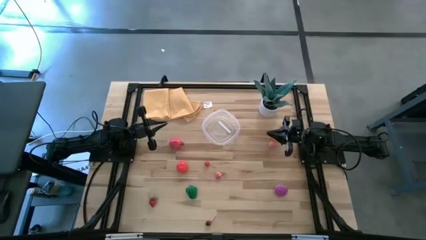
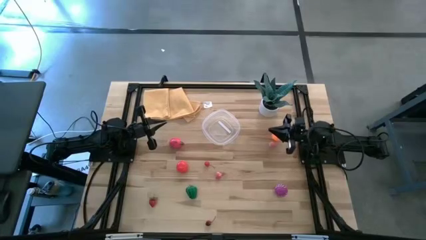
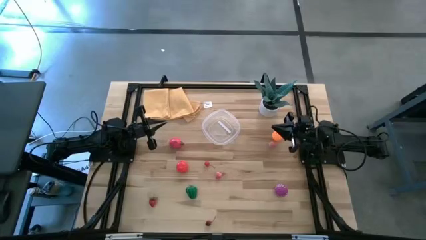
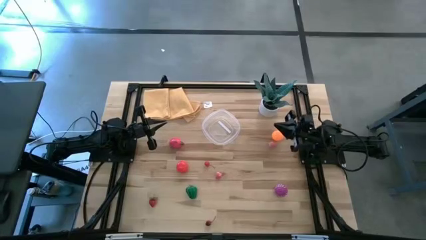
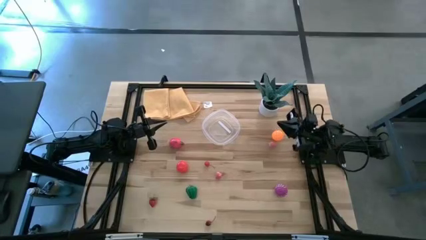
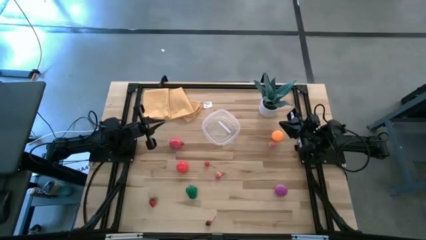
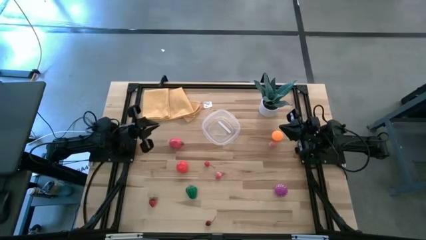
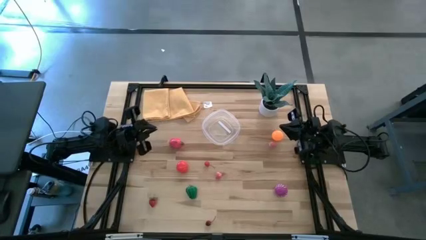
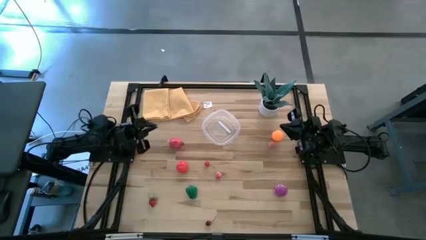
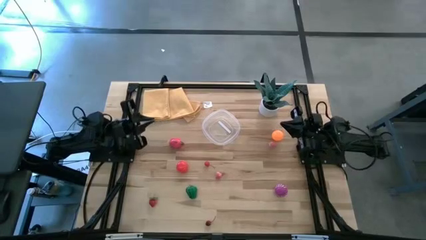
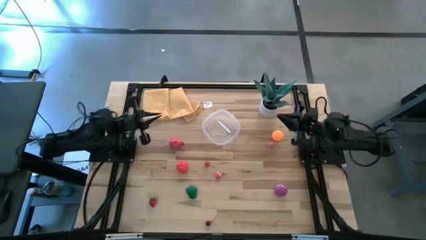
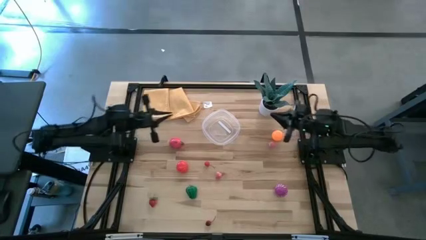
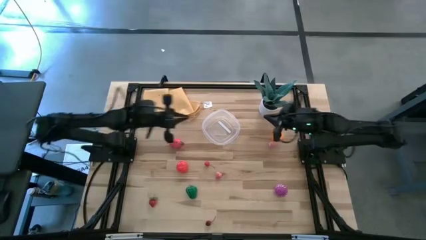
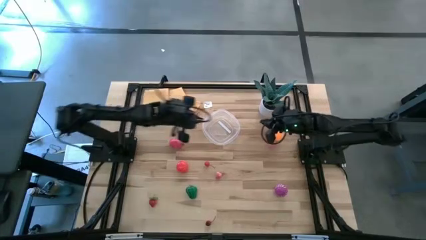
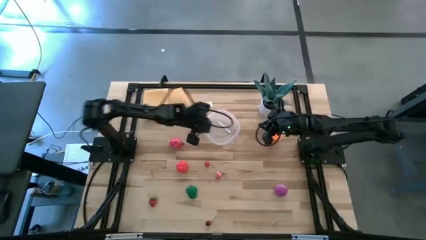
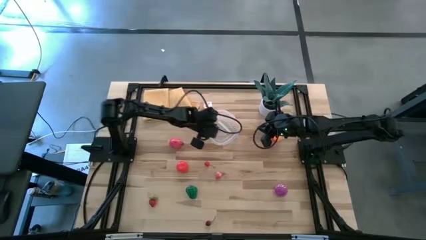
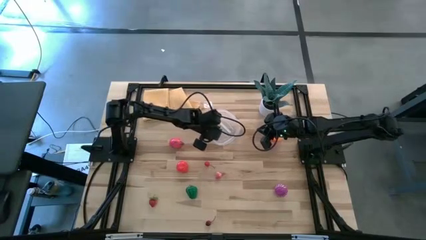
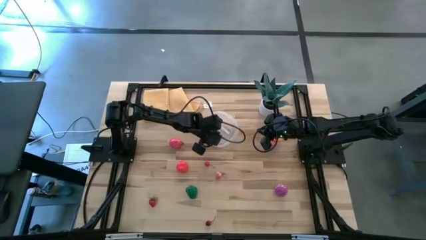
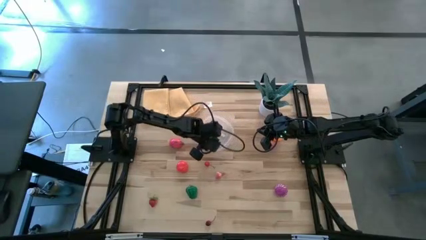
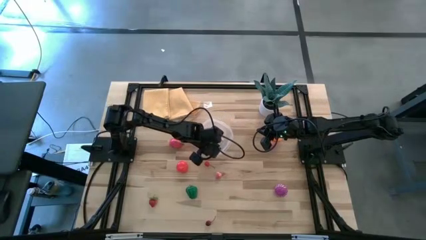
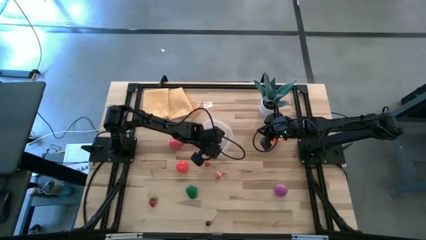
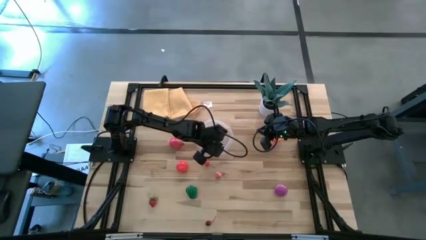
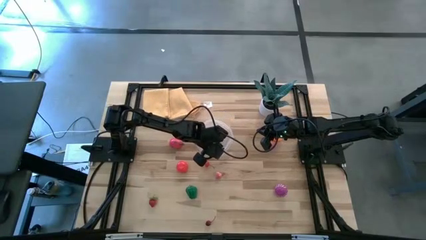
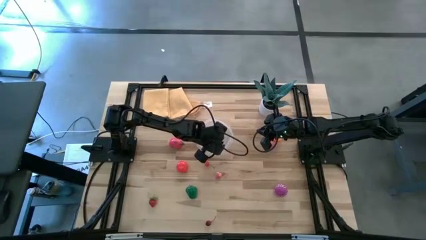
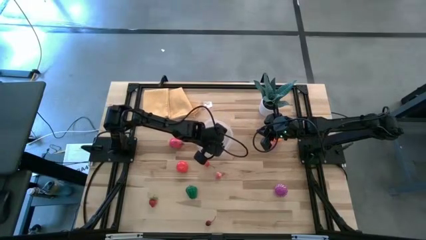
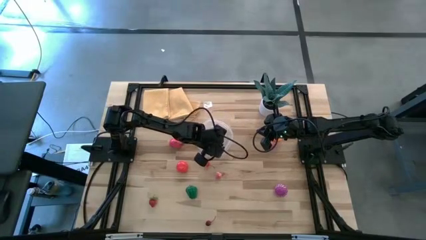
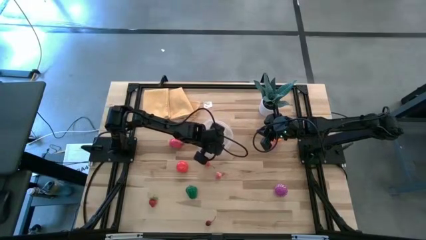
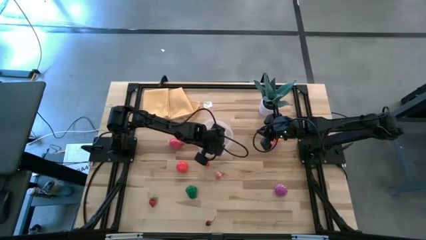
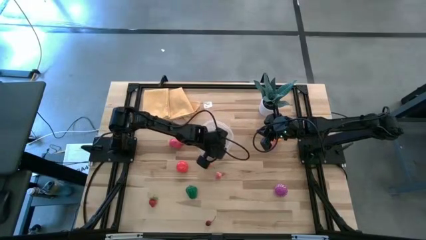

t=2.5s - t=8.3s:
Task: Pick and placing Produce into tupperware
Adjust the transparent bin

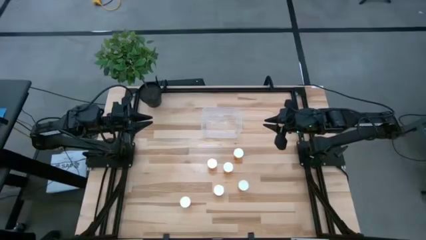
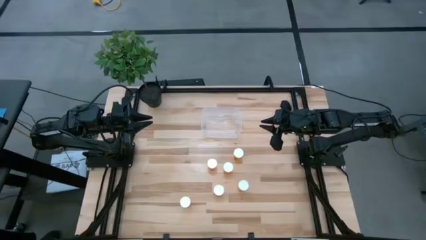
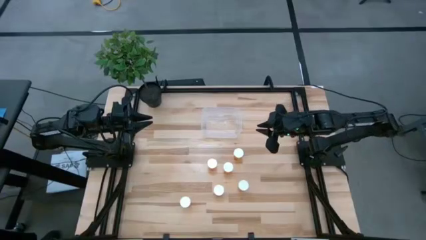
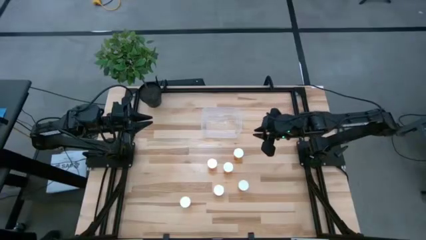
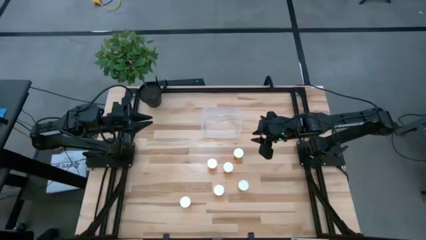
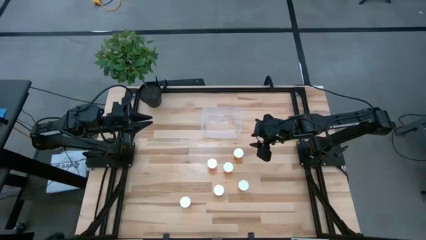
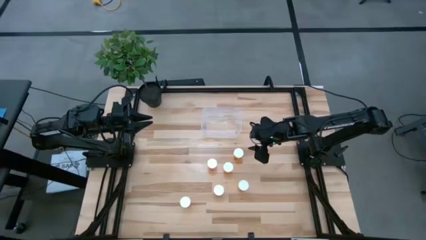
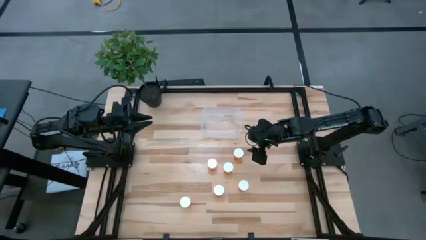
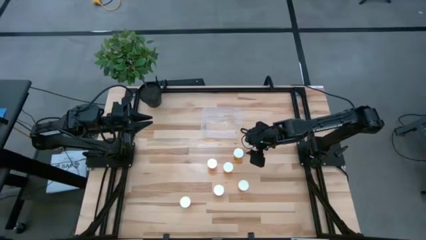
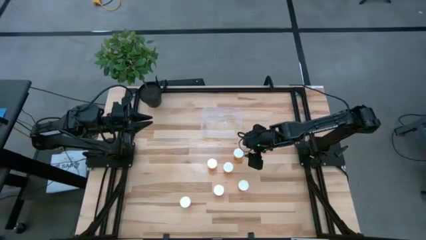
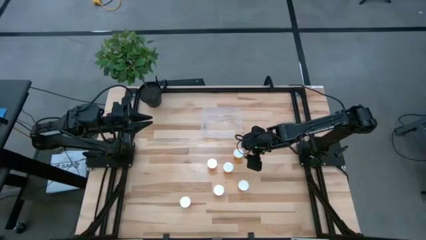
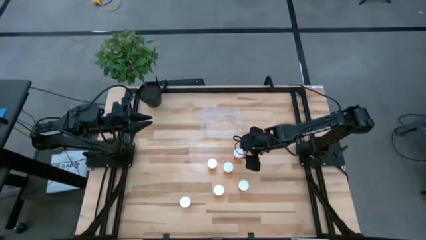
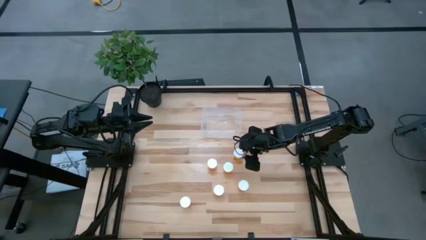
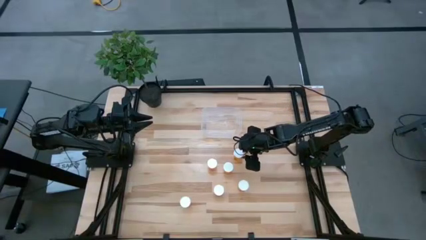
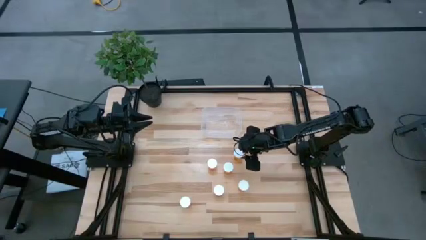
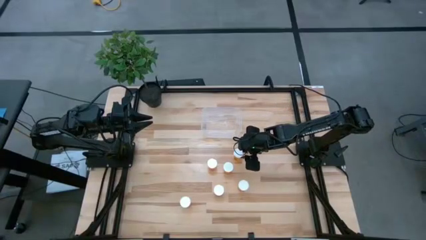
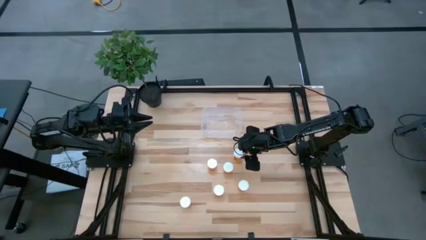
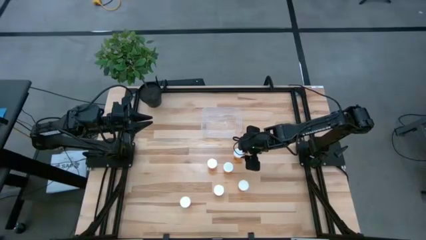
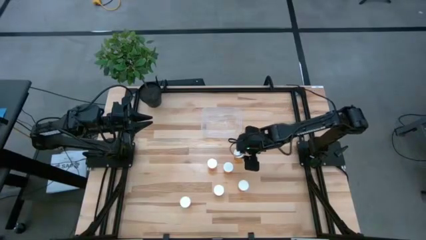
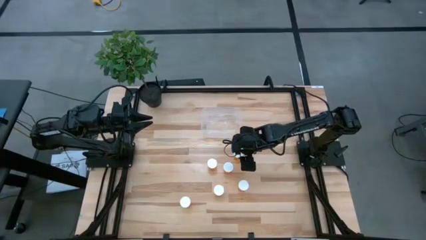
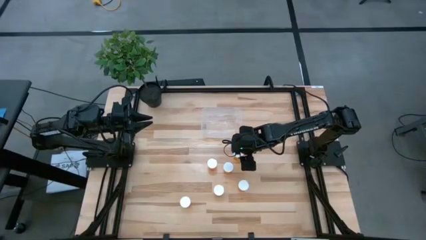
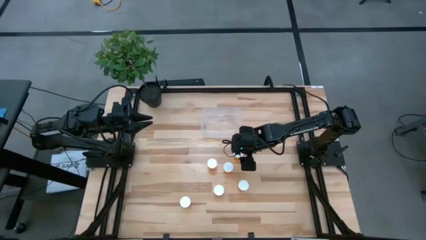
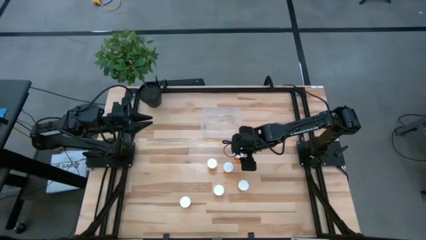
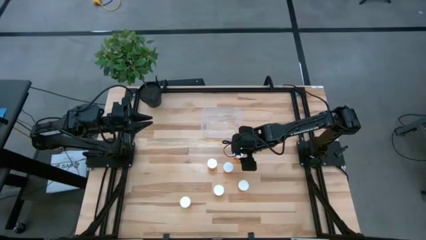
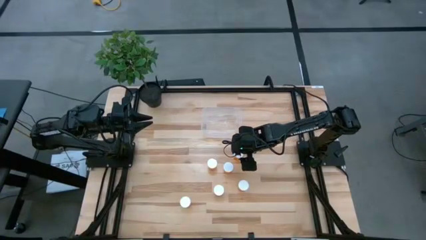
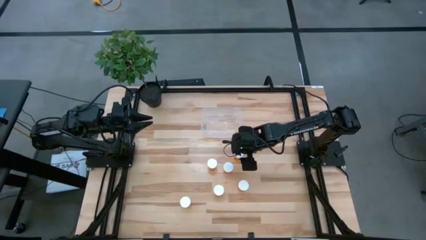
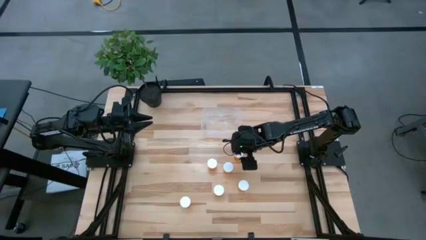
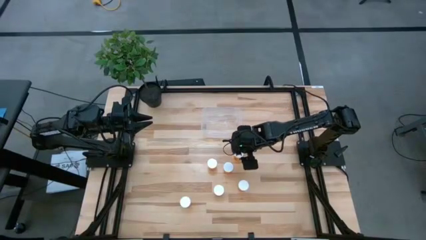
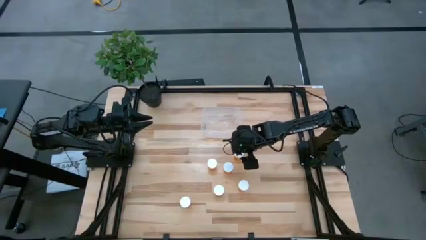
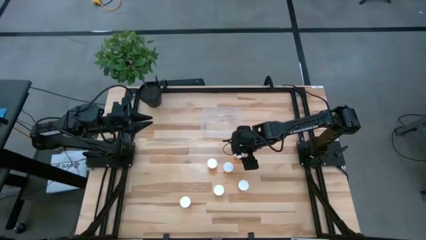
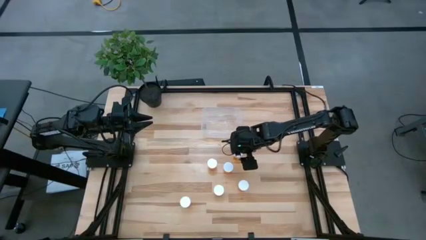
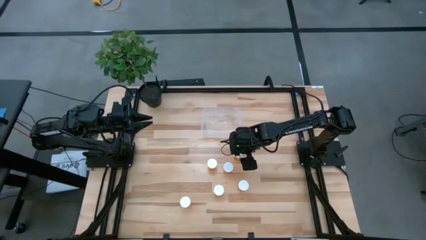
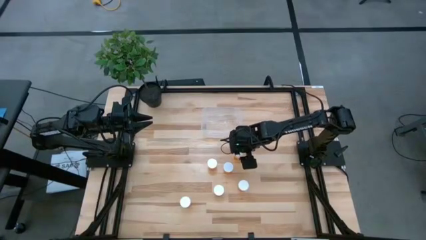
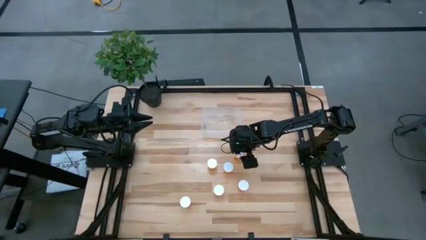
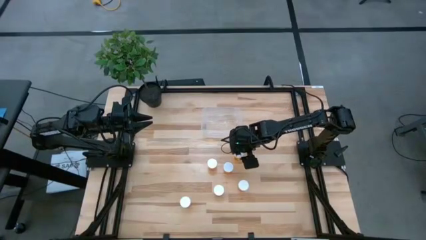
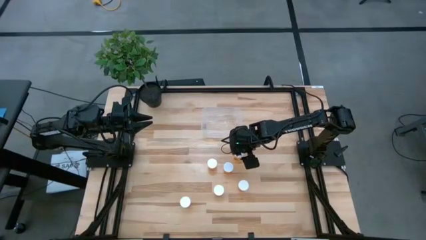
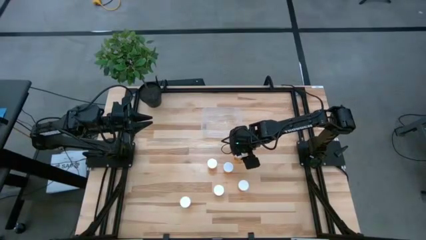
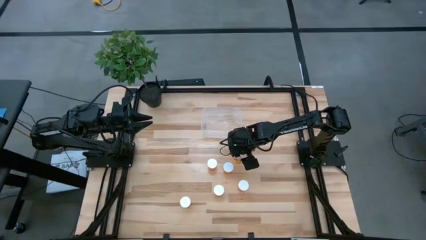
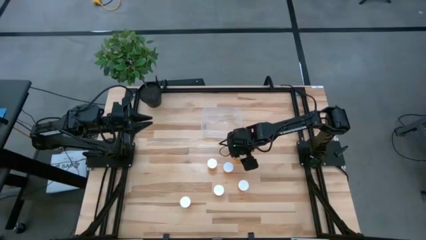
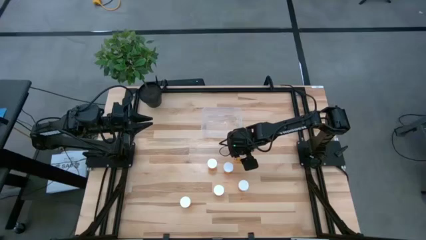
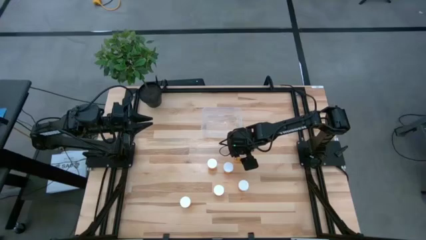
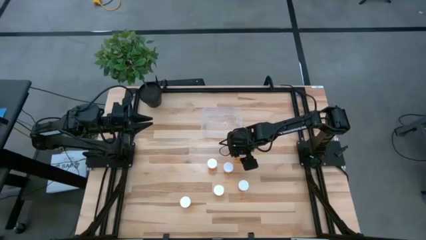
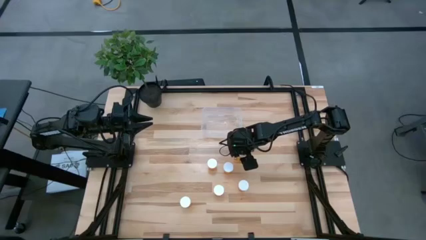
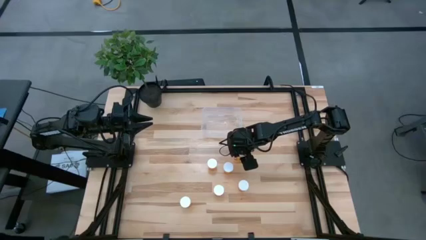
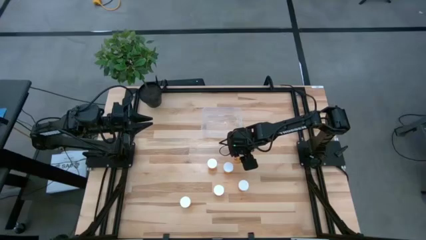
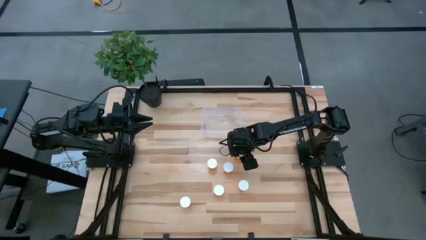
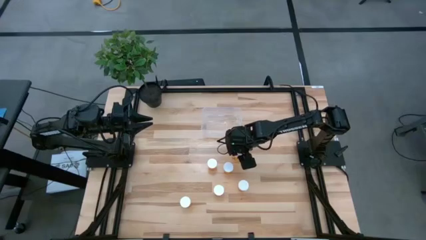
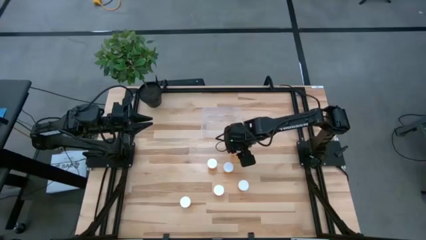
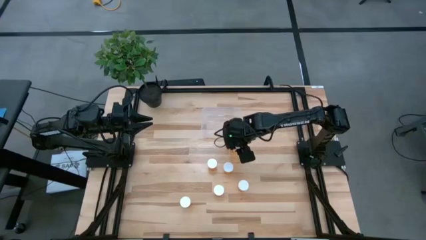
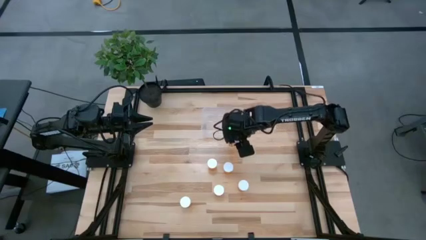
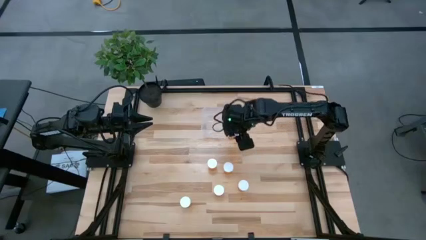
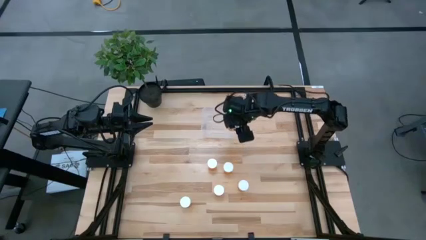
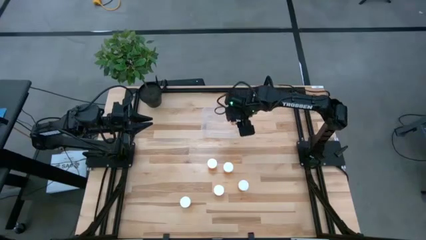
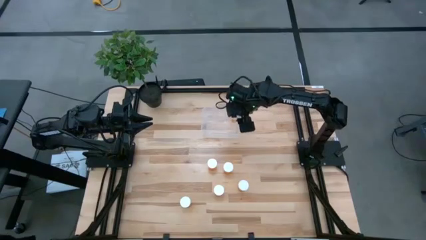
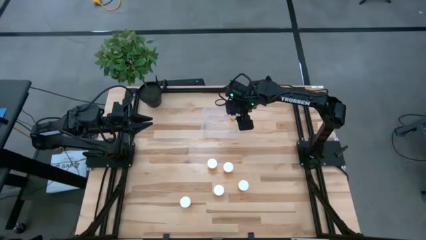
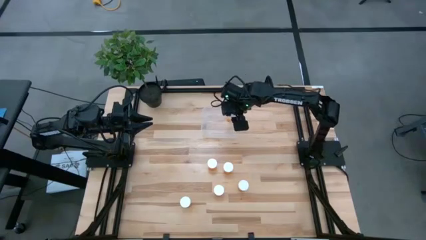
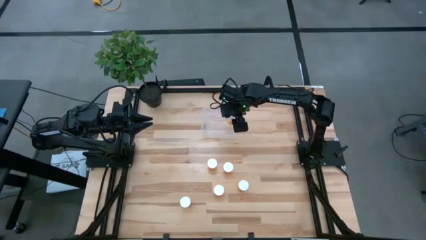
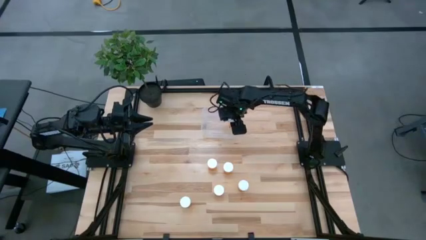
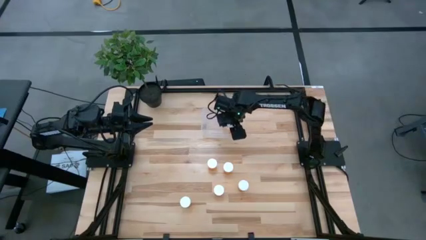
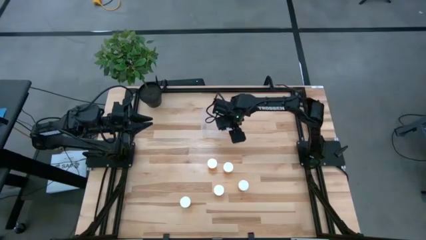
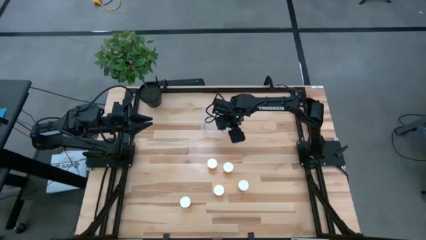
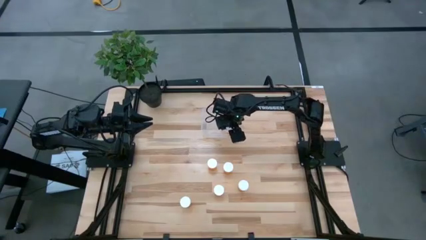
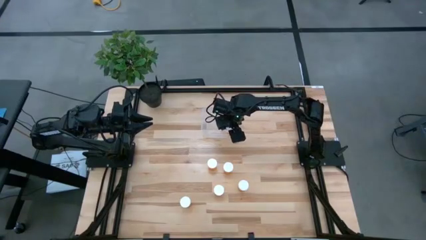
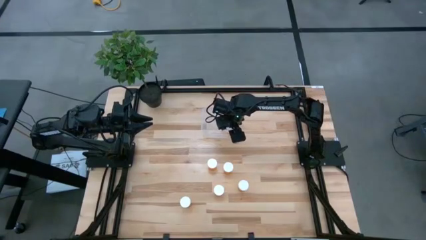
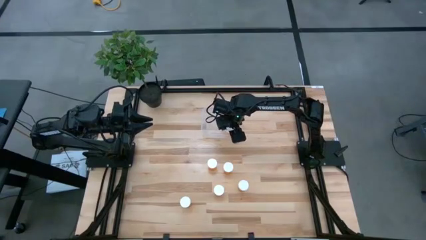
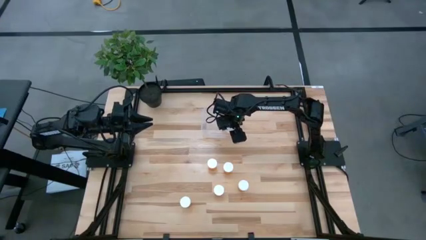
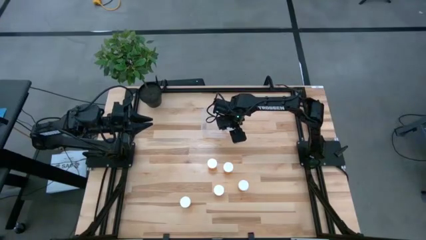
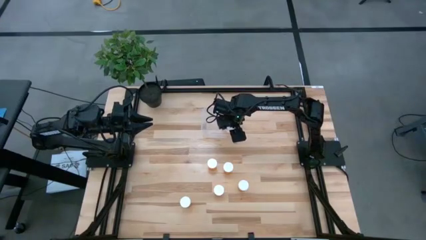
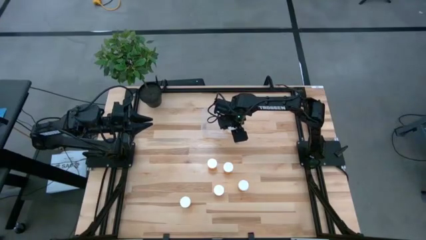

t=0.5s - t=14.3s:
Task: Pick and place pill bottles into a basket
Put the orange pill bottle into the transparent bin
